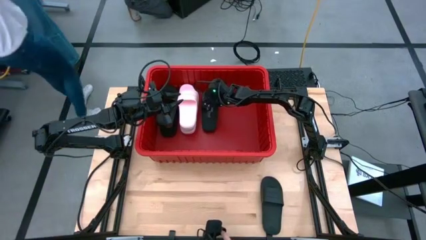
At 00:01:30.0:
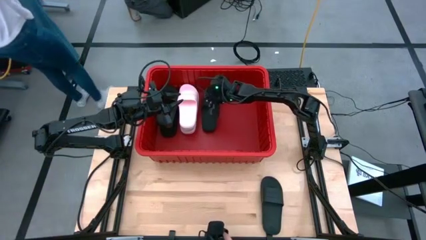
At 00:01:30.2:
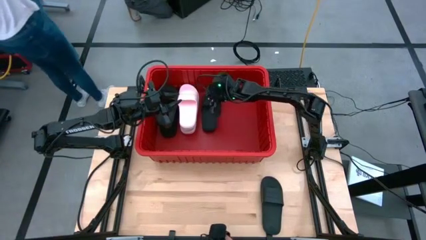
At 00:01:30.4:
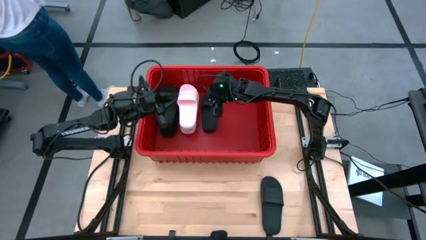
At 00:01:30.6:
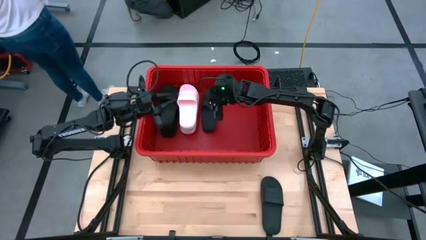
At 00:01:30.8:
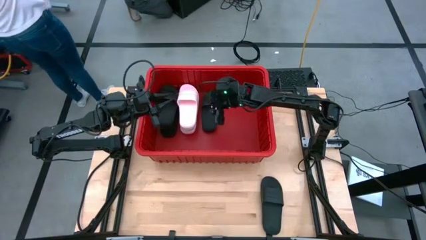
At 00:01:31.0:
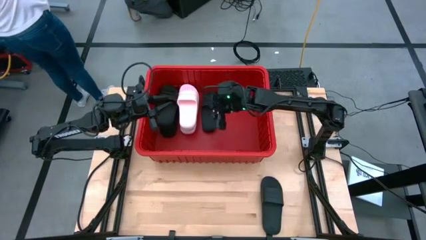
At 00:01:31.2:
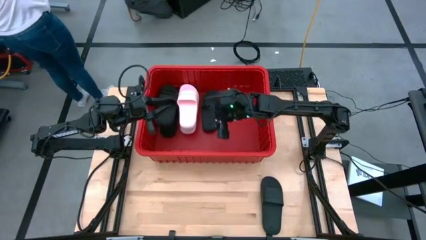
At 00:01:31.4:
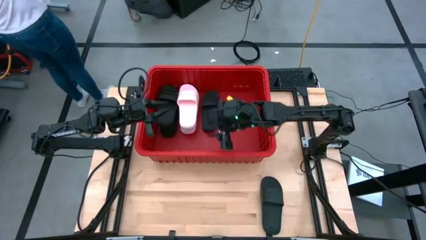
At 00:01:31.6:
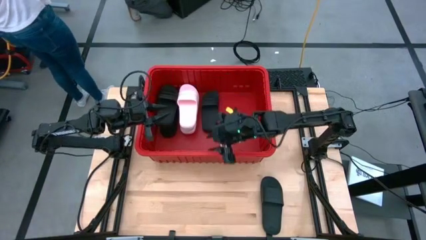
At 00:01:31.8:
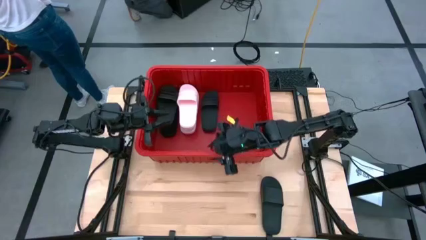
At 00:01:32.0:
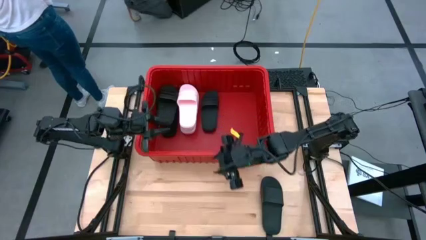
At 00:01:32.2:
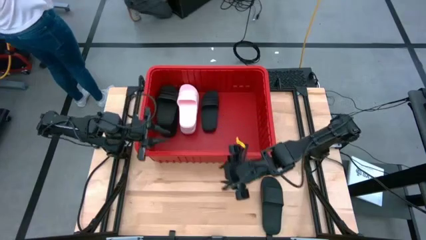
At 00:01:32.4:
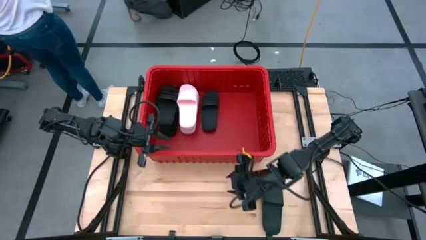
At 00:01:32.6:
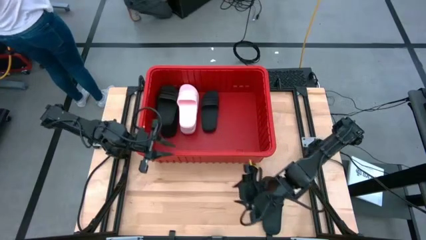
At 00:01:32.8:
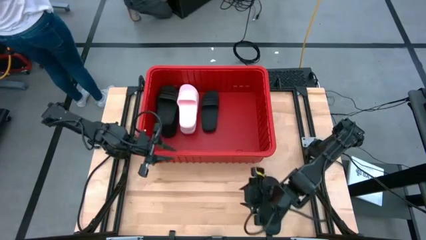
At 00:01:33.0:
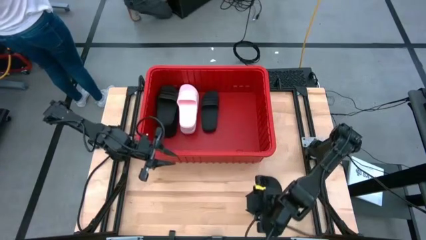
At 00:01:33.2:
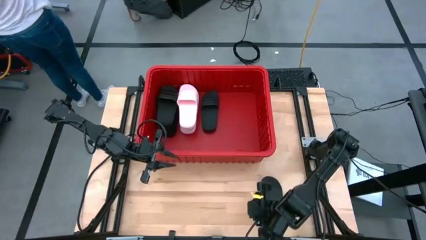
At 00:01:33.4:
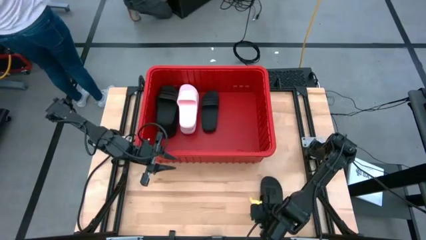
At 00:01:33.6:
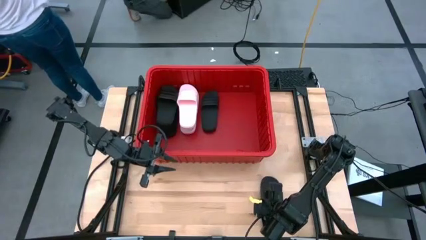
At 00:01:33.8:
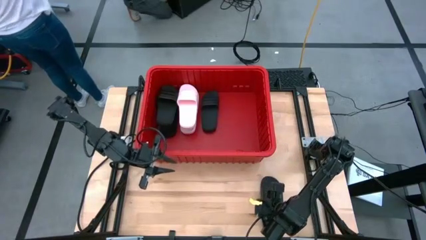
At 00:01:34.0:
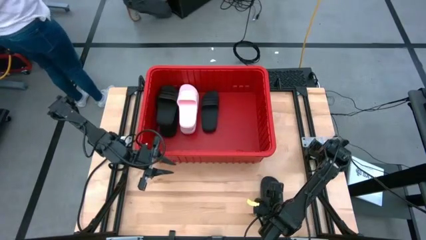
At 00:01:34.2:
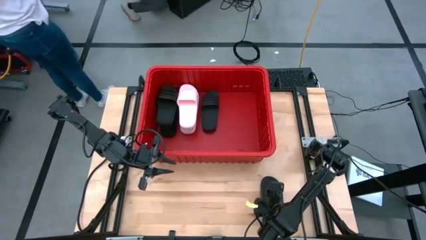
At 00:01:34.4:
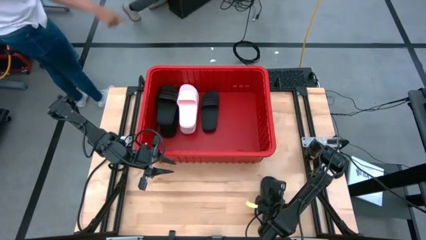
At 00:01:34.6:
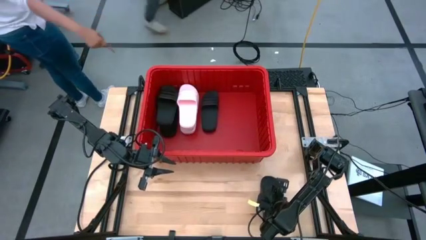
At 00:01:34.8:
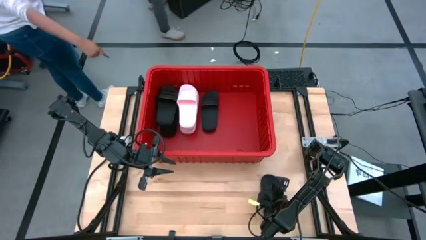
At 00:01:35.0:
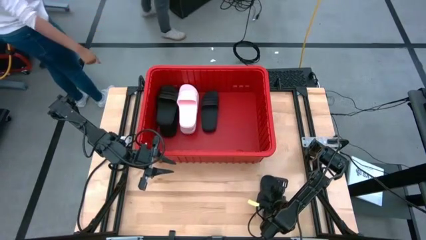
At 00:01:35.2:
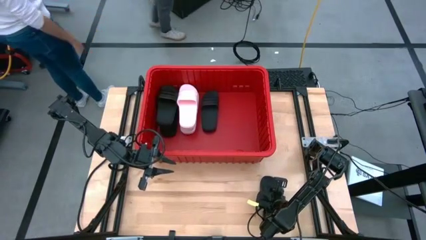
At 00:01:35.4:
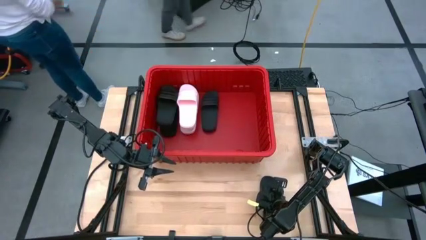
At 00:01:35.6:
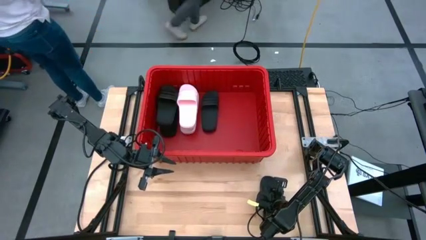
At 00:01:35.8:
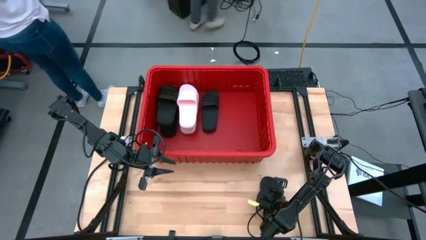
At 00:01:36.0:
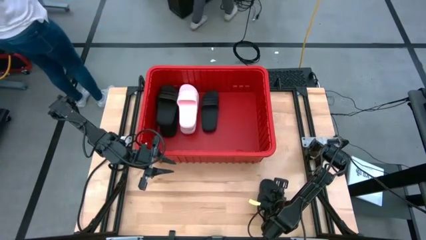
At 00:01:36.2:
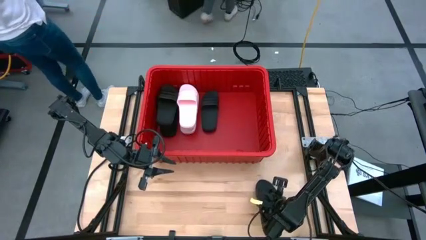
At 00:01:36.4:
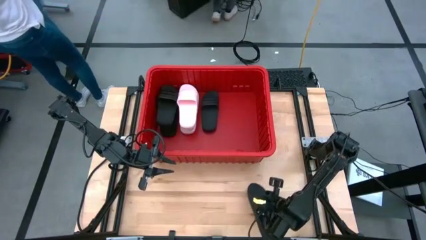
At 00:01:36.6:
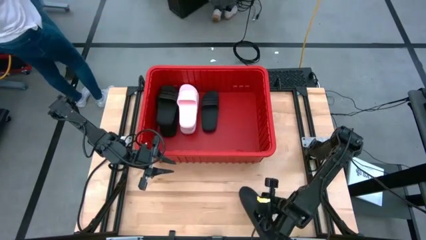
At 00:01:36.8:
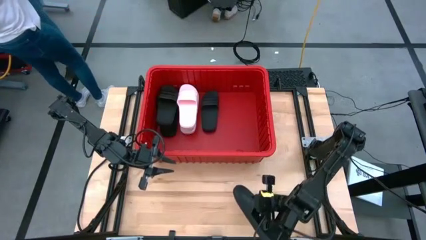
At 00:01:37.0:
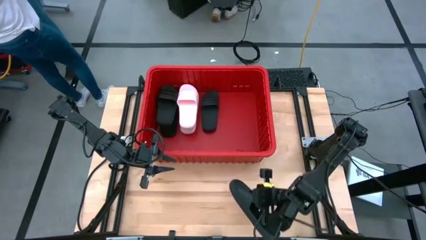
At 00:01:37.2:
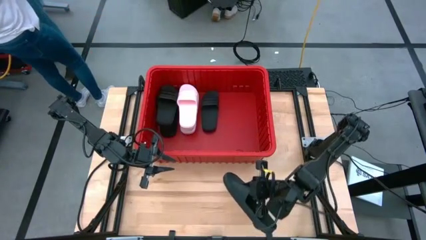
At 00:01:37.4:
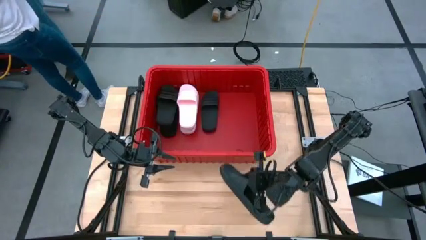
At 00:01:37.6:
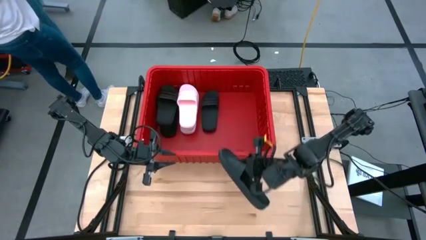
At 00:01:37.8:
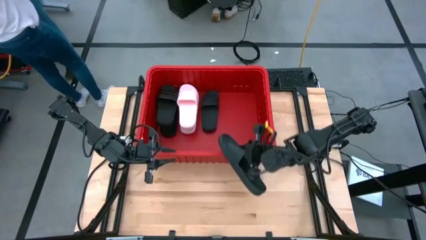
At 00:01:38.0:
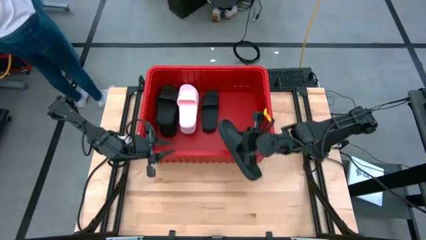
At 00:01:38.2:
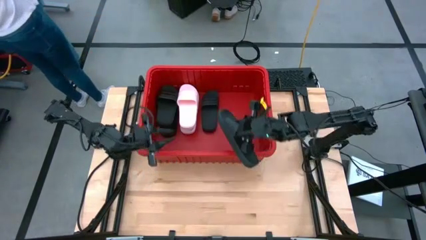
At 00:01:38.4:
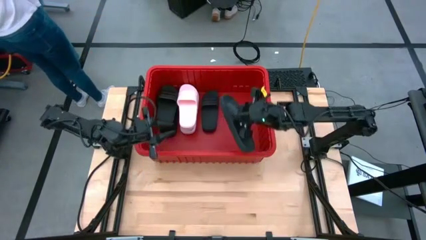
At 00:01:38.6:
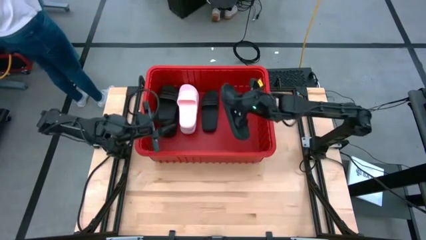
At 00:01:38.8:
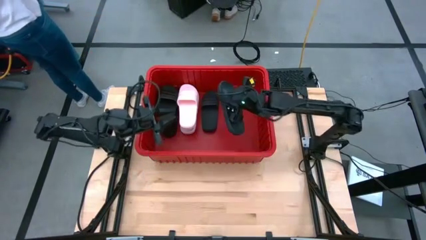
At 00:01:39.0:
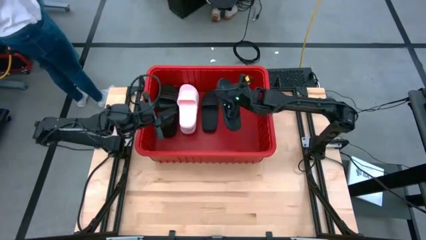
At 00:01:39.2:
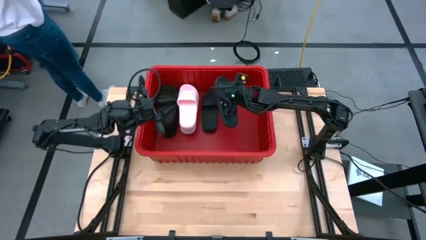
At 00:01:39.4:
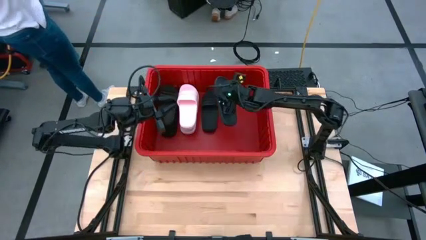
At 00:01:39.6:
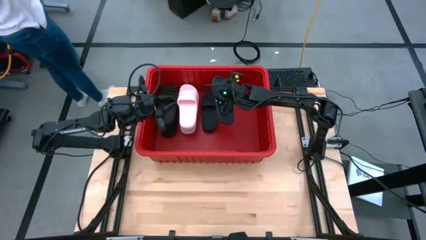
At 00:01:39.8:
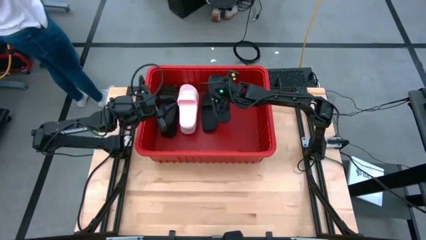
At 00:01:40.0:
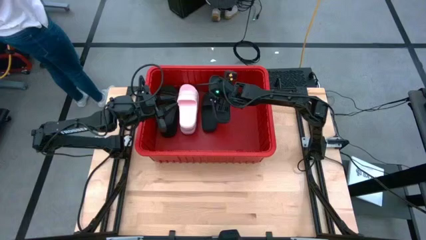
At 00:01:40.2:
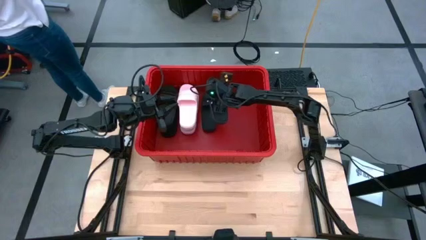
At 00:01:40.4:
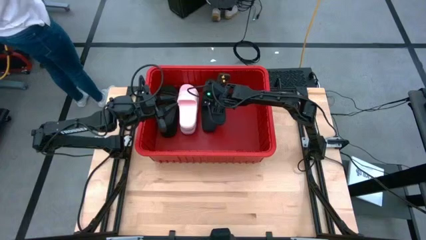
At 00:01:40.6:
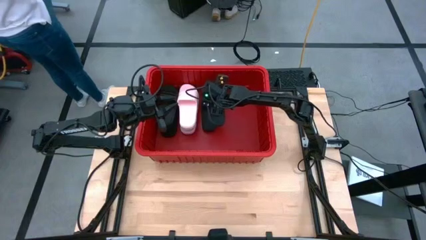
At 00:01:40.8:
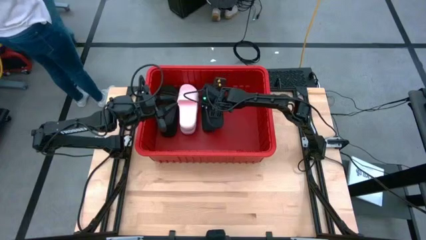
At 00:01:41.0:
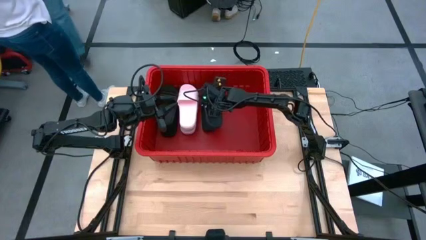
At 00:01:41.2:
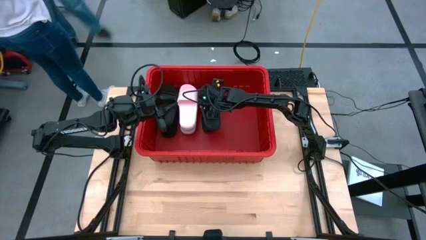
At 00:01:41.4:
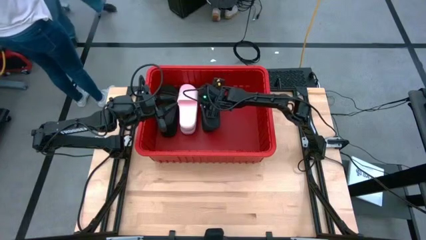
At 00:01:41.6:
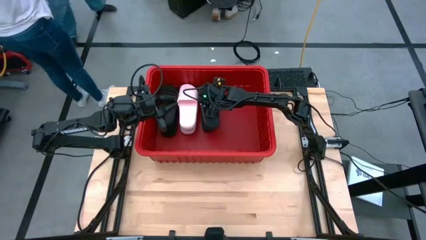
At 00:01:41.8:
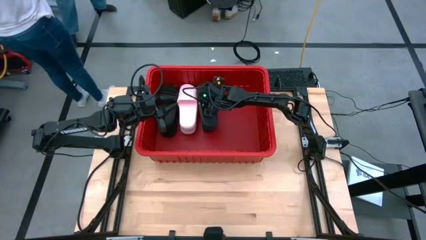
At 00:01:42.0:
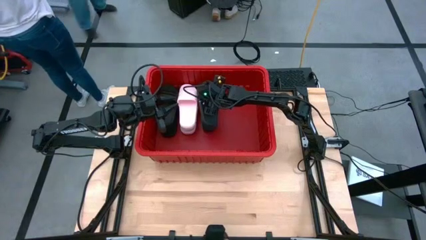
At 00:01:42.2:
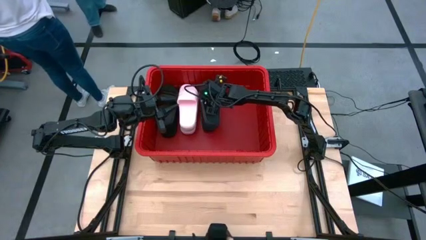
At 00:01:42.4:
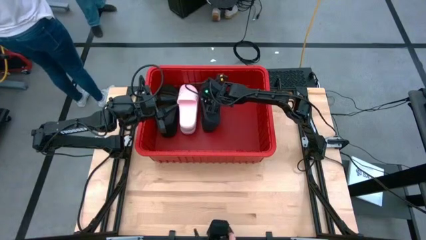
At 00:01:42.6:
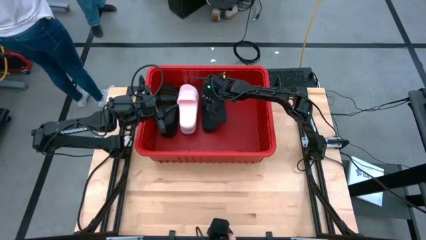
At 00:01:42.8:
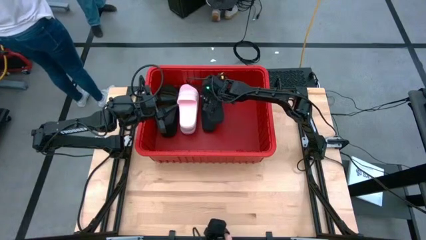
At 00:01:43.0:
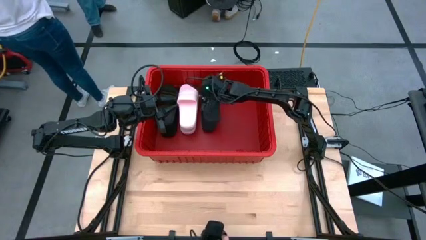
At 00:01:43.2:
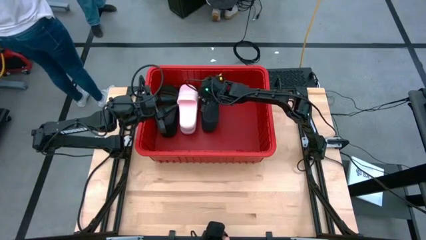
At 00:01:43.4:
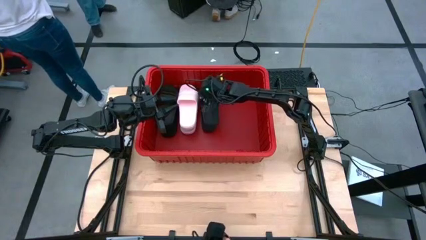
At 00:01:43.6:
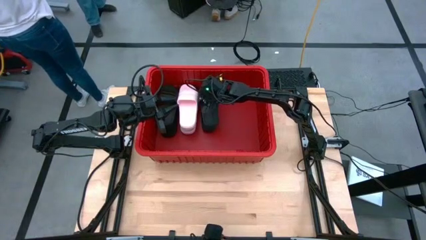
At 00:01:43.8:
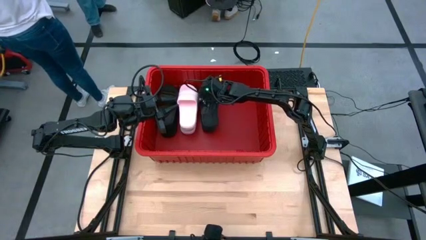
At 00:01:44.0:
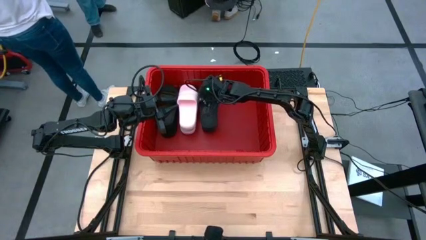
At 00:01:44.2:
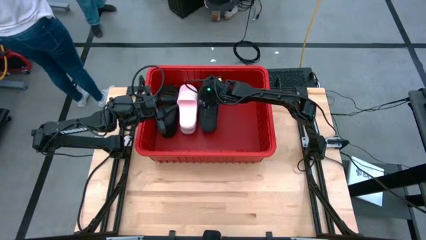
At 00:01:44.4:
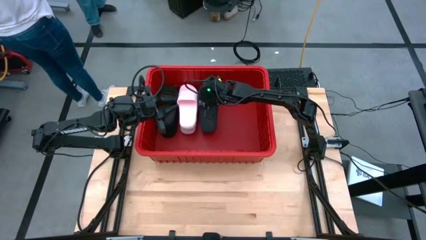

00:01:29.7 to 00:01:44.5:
Task: Pick and place slides into bin
Put the black slipper into the black slipper
